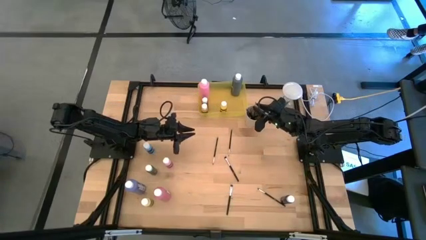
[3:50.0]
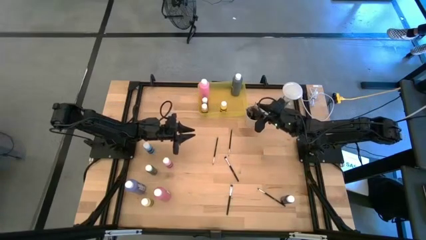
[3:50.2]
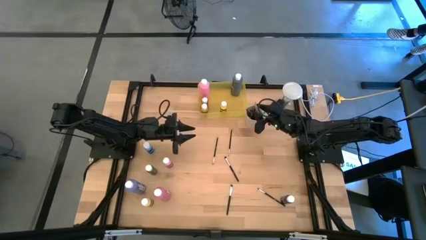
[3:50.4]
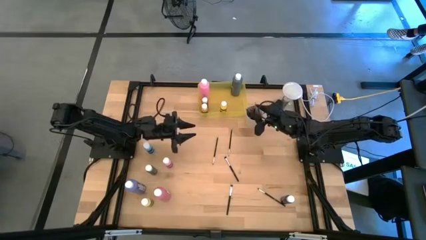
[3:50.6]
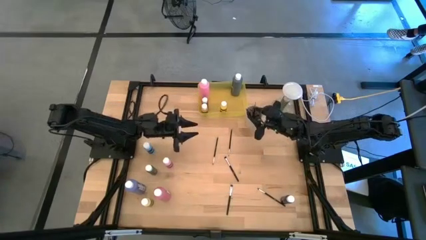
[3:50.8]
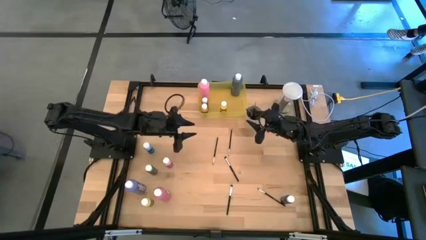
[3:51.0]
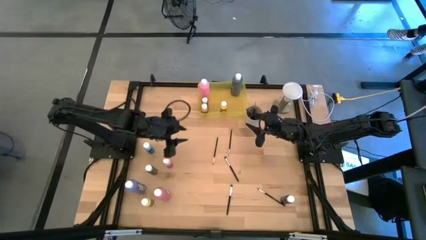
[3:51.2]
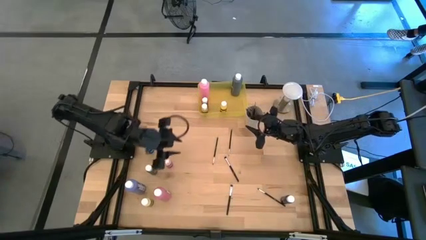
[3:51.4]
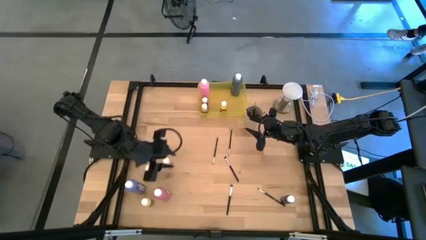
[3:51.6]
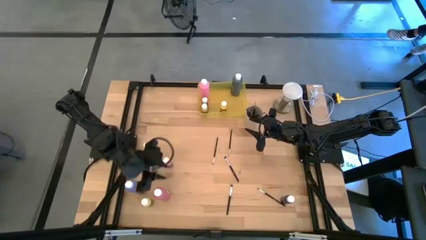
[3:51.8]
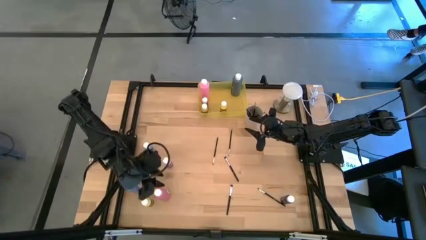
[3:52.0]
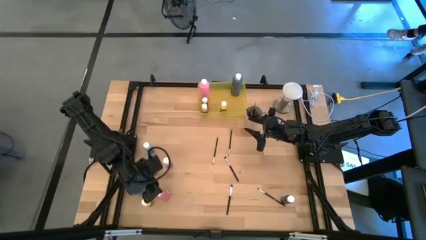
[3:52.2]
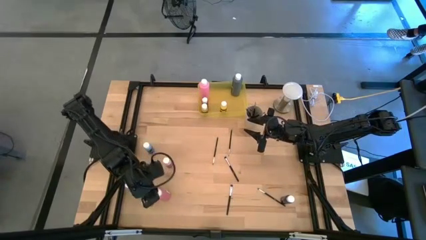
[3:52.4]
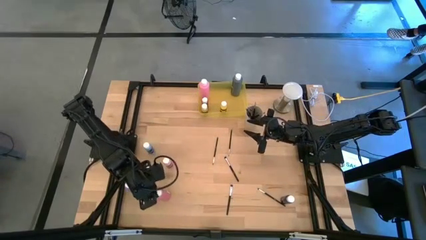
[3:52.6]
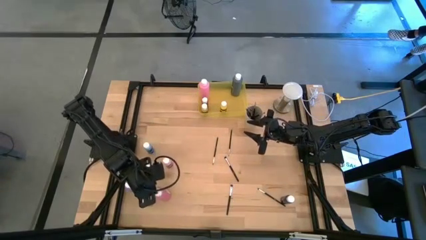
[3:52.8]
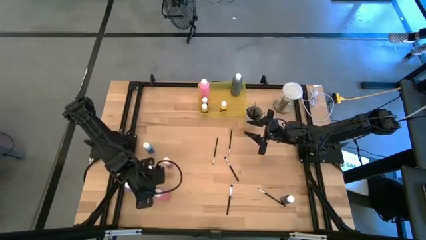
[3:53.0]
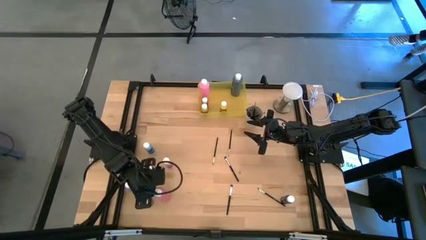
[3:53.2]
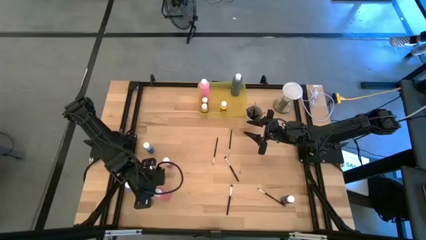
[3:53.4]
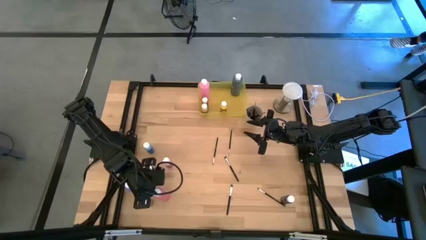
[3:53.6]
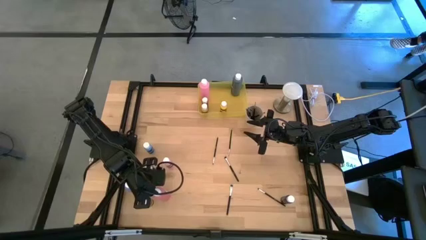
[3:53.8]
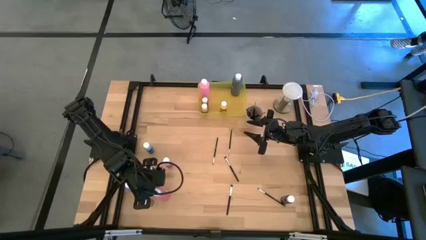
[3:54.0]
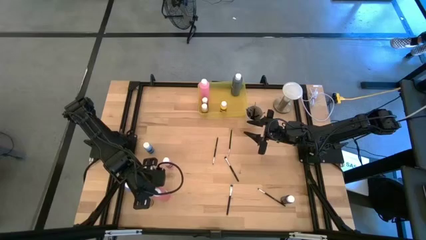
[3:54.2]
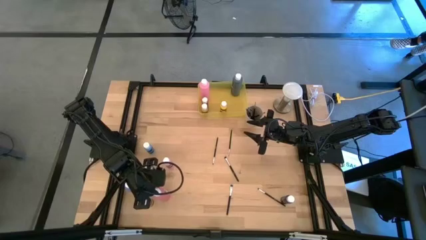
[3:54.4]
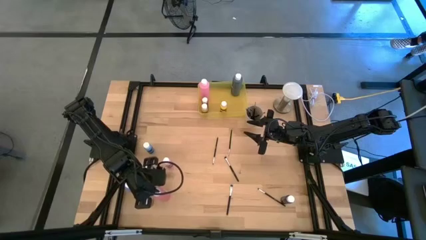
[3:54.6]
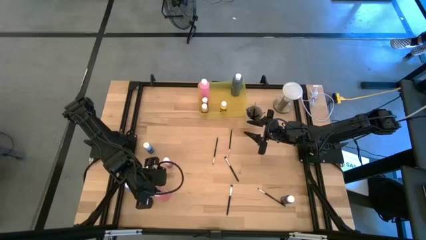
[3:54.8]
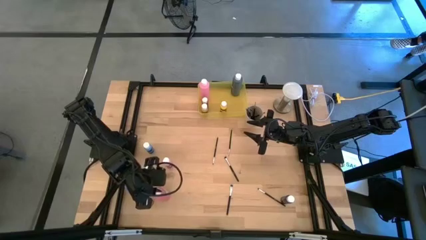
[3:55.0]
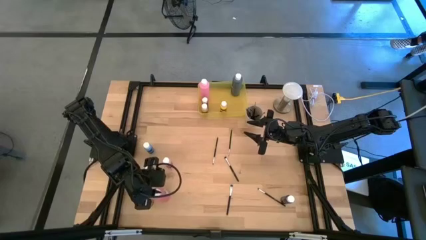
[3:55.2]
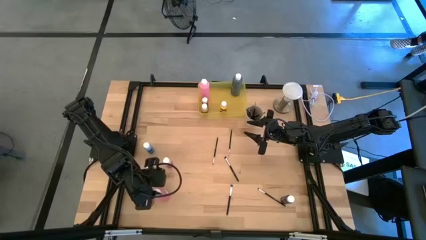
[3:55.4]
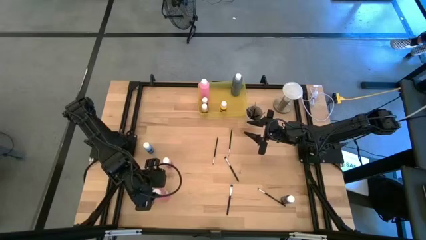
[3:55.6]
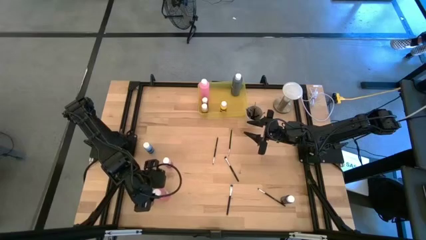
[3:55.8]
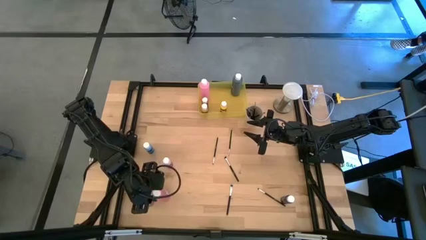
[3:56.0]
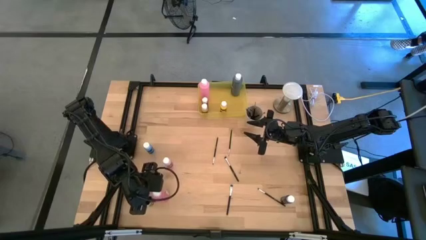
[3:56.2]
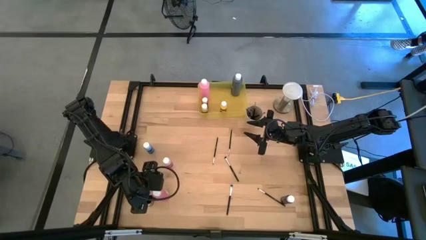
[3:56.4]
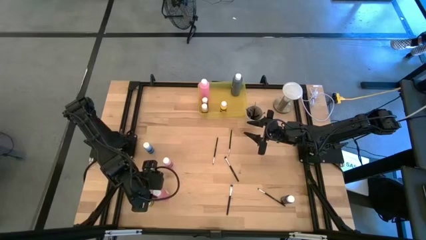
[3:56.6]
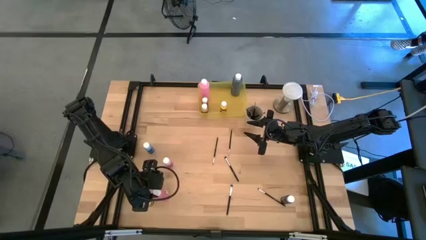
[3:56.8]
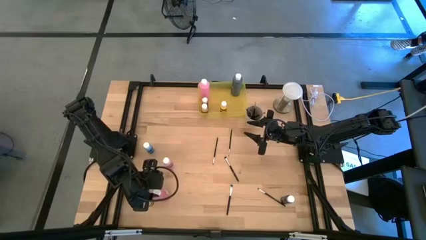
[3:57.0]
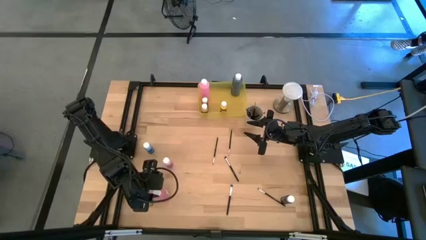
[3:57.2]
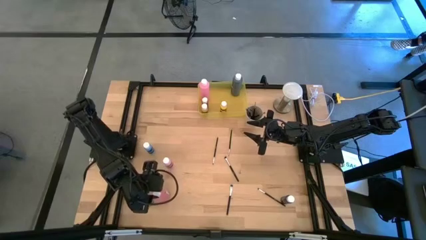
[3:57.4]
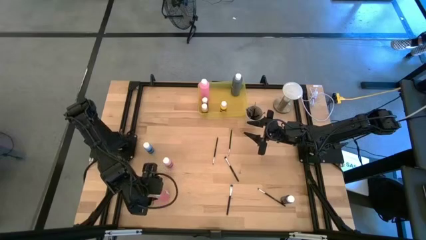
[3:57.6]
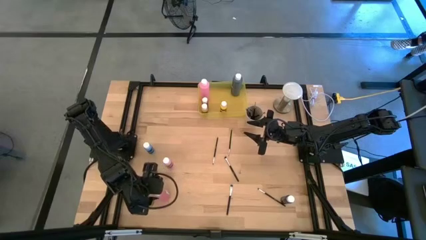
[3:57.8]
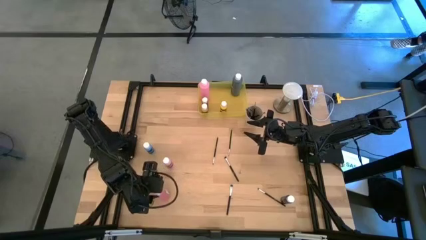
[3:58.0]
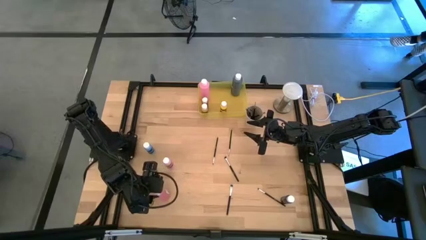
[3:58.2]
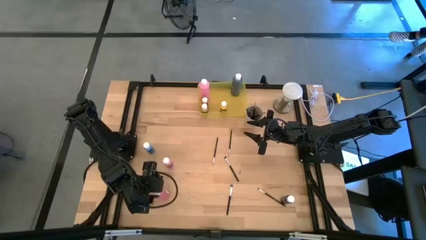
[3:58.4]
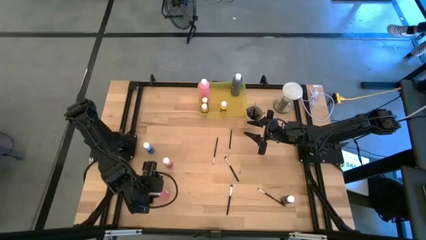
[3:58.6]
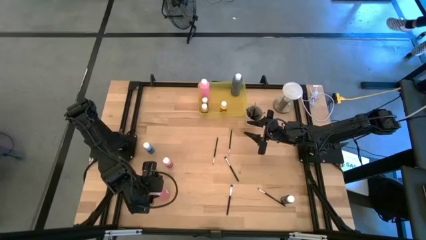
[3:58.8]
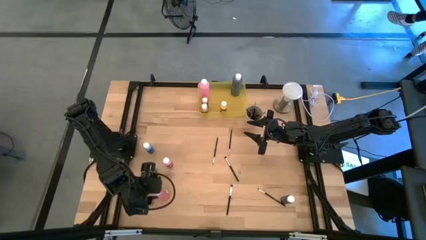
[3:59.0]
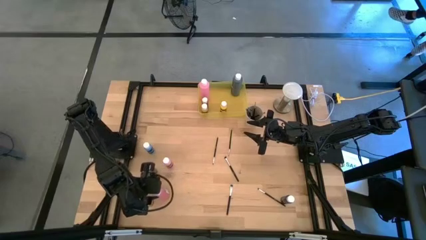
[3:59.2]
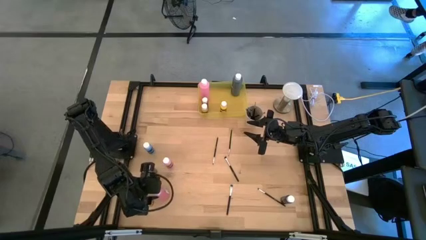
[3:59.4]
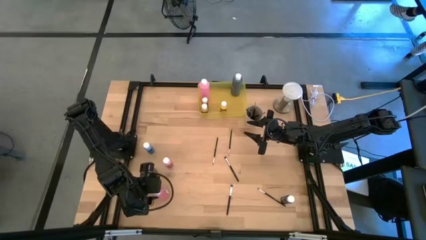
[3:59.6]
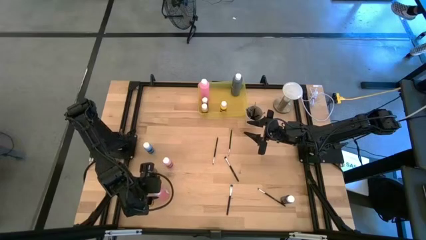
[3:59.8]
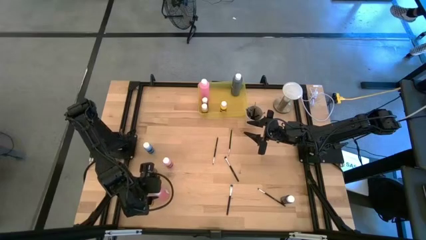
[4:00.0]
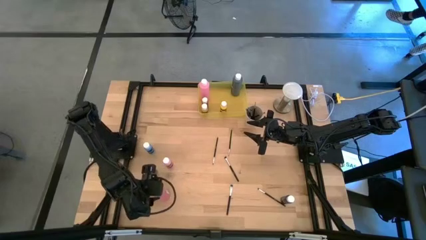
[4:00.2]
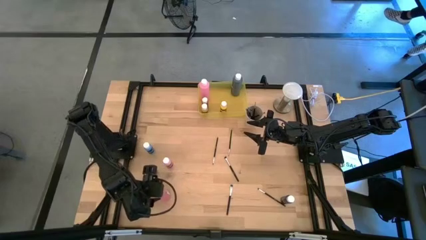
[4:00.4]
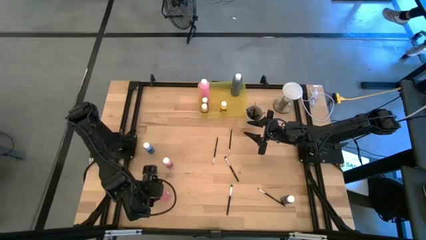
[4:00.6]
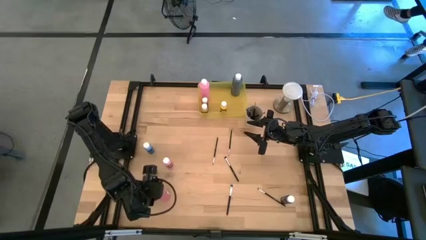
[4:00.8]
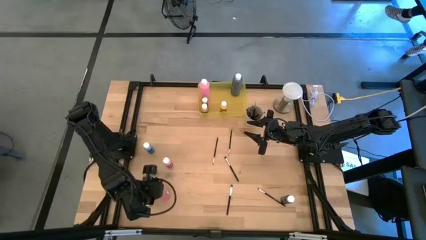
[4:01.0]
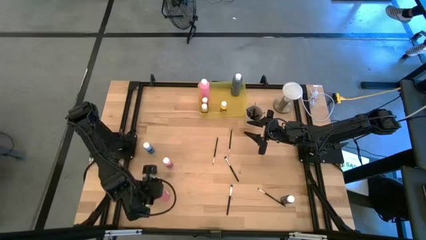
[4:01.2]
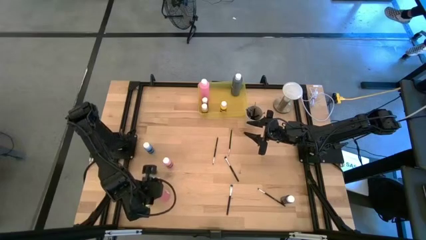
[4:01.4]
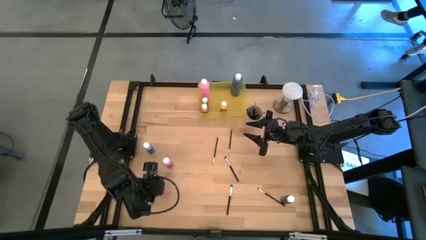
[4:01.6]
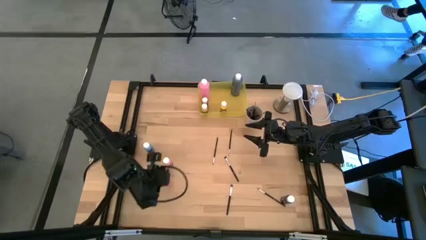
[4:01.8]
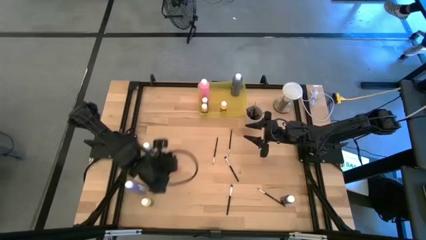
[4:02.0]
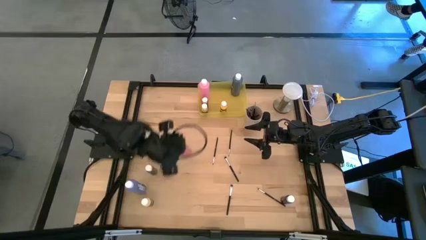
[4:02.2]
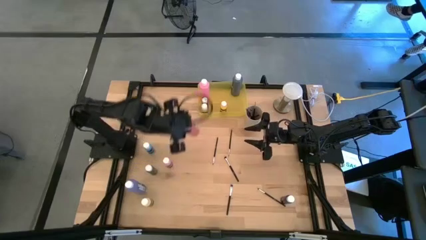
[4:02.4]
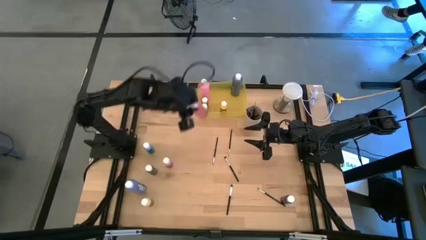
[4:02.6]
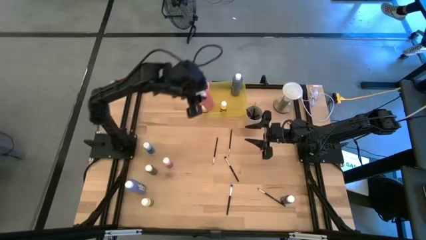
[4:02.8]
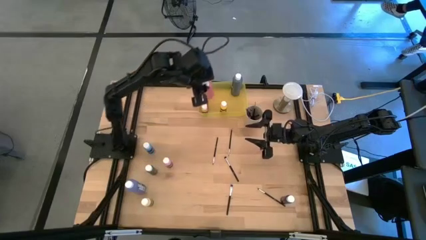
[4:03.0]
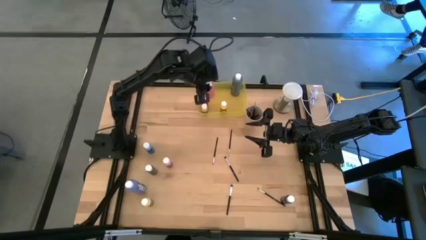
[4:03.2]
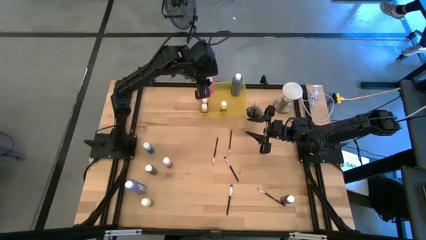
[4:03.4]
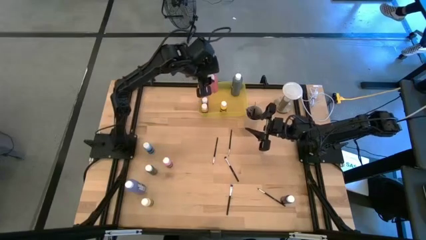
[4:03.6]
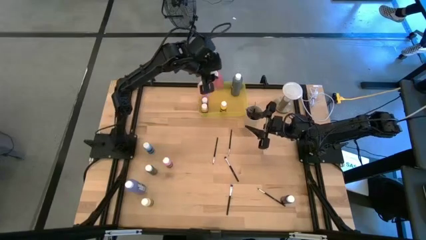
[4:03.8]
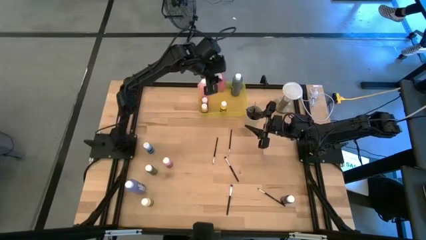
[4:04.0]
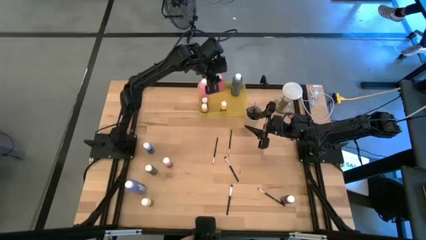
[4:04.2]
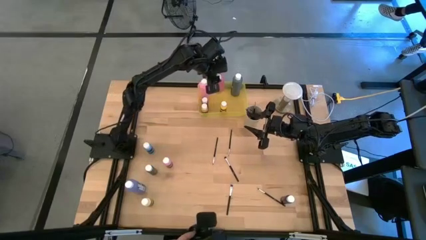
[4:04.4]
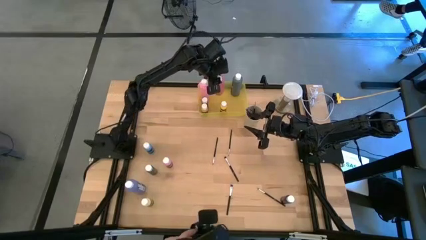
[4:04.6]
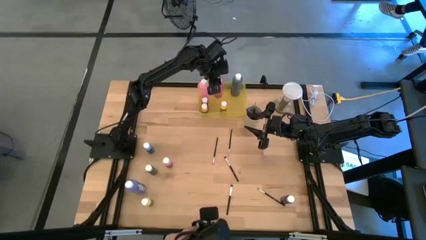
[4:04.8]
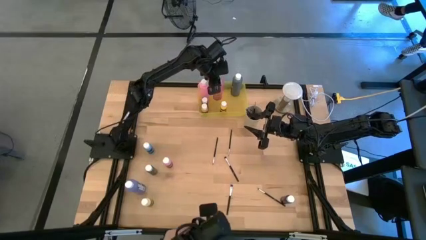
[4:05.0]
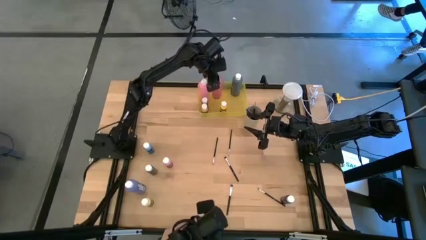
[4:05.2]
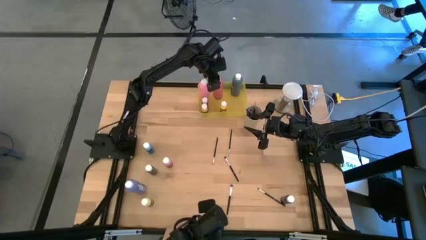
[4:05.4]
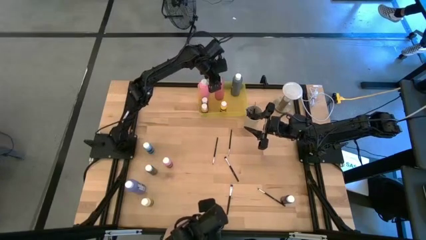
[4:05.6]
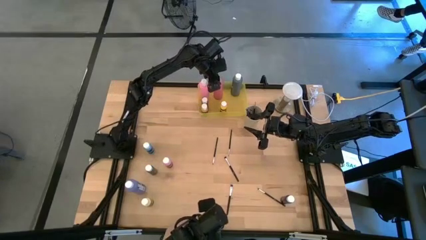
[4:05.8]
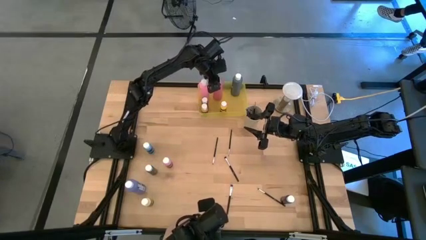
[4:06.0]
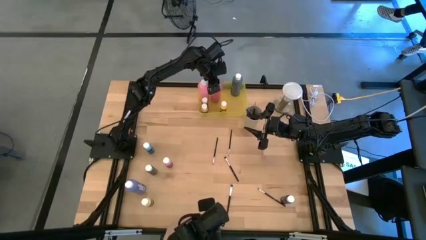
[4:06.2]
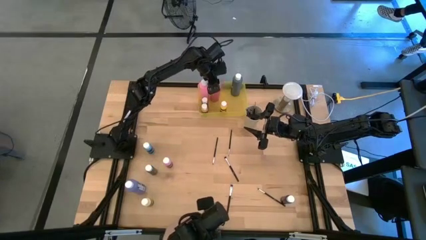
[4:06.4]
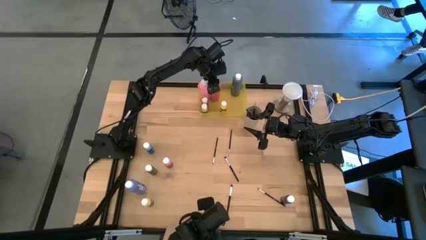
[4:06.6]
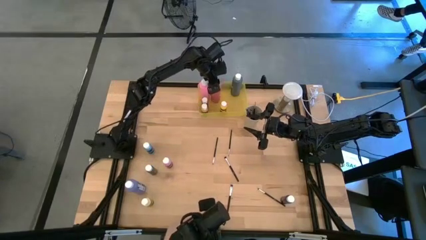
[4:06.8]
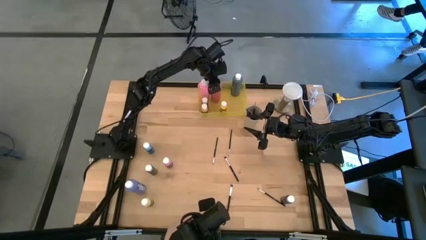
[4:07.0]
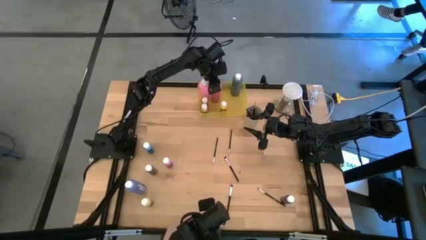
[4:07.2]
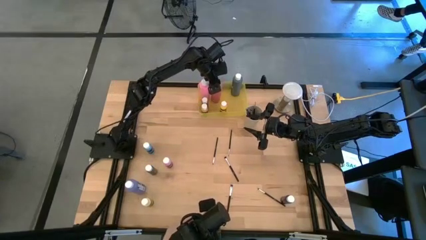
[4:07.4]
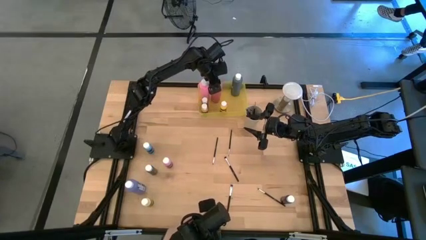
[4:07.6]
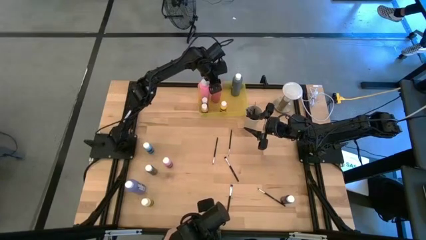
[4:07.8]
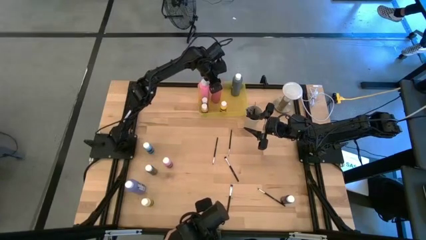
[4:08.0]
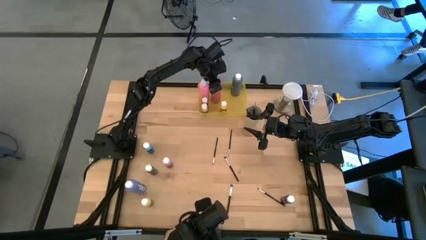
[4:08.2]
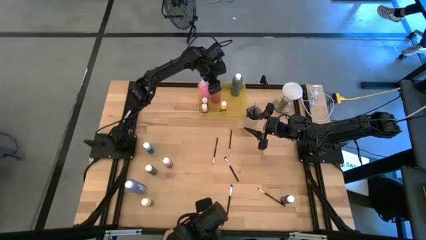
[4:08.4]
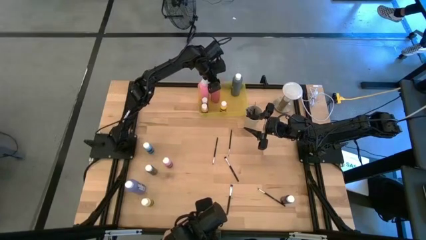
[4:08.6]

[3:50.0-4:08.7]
Task: Pick & Place Paint Supplies
Put the large pink paint bottle into the yellow bin
